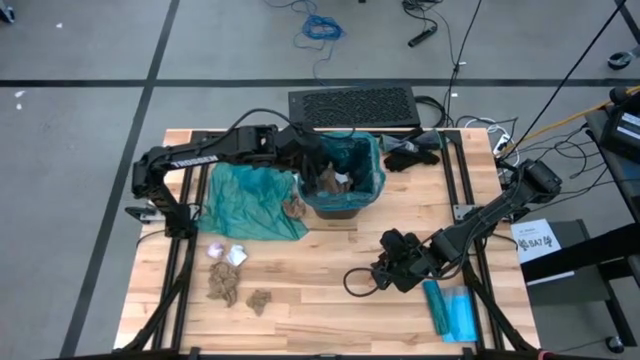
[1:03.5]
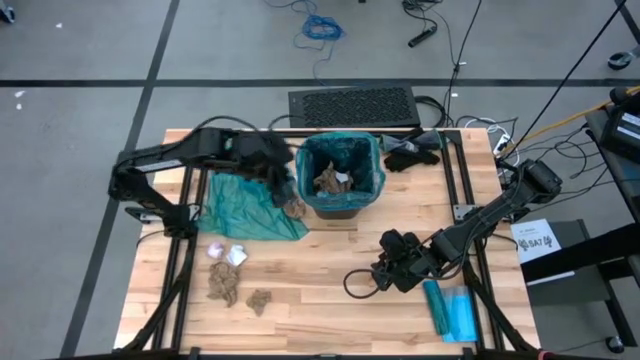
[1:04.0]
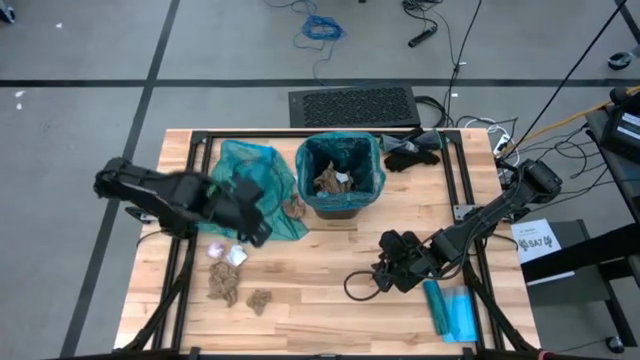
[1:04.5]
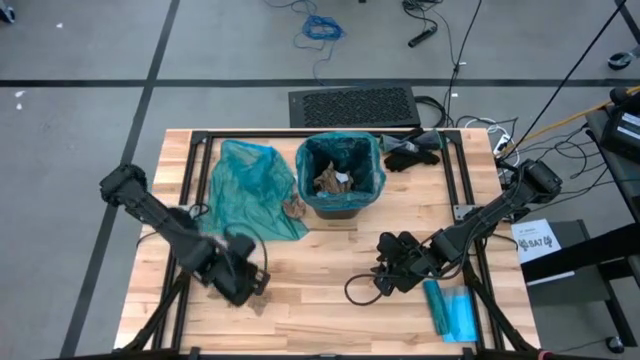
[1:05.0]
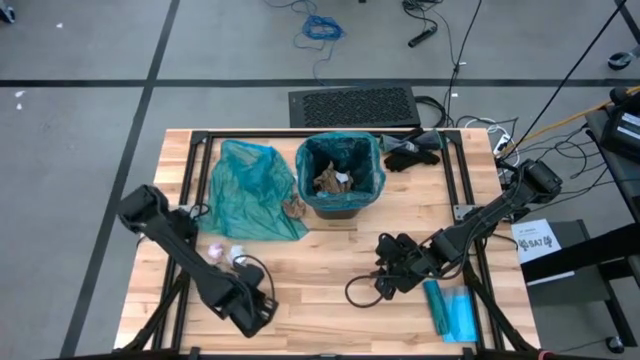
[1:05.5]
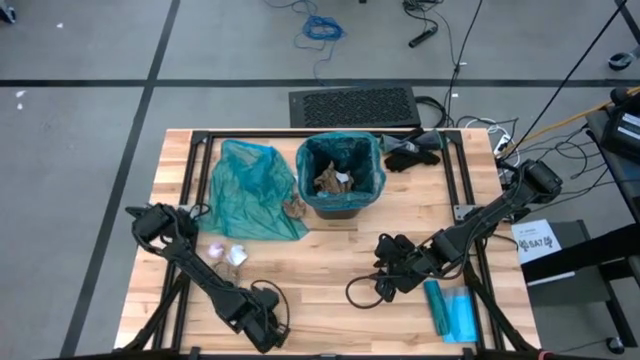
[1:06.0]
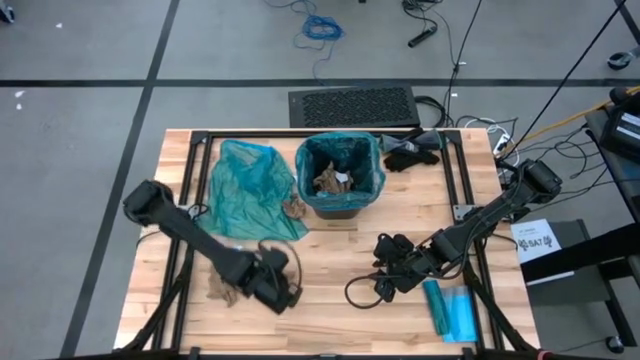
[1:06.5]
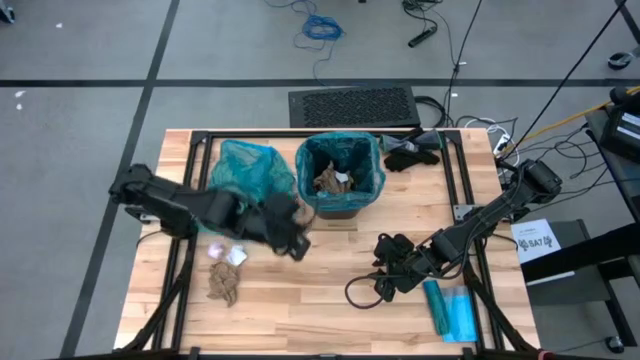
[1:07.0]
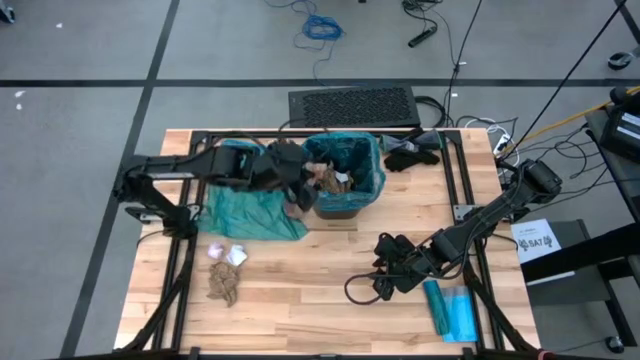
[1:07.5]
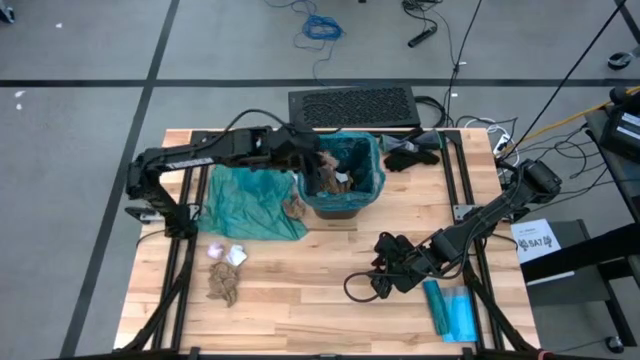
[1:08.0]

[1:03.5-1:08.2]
Task: place trash/remove bag and relplace
Put the brown napkin into the trash bin

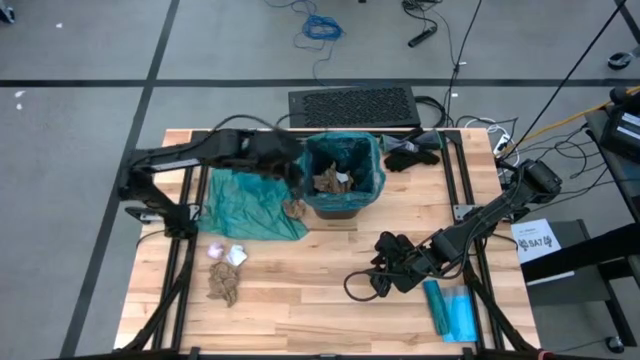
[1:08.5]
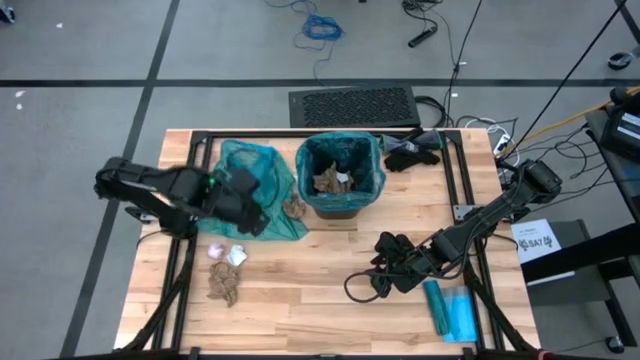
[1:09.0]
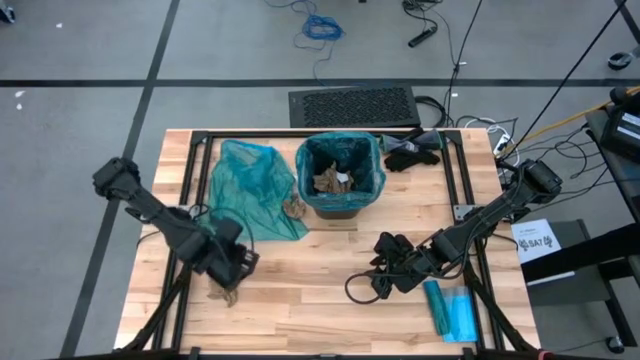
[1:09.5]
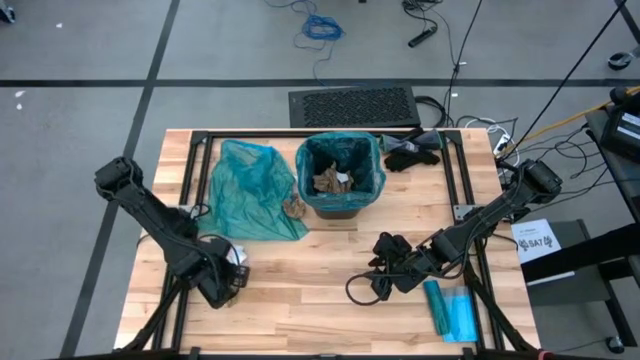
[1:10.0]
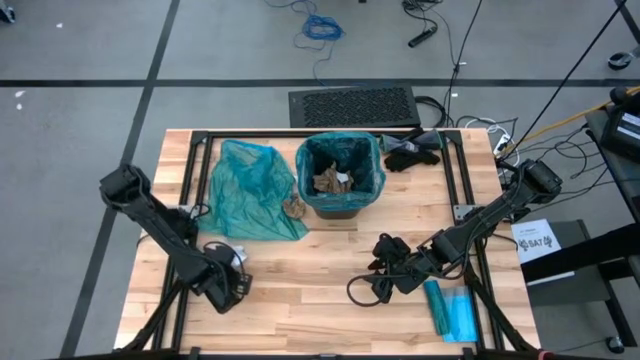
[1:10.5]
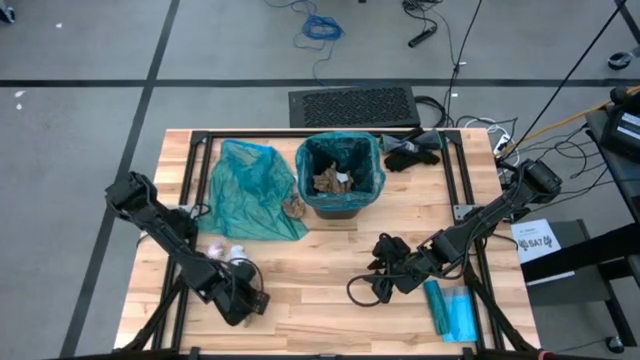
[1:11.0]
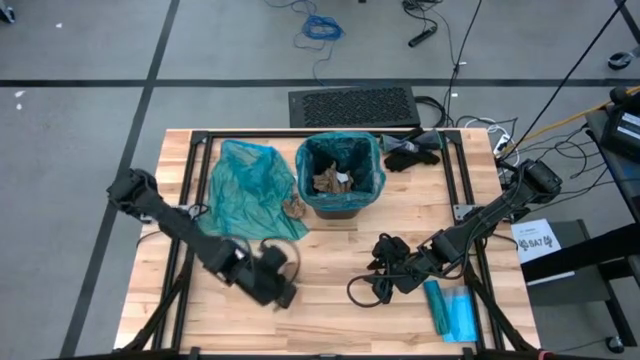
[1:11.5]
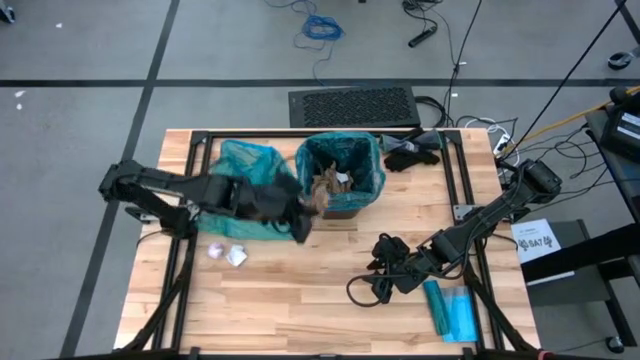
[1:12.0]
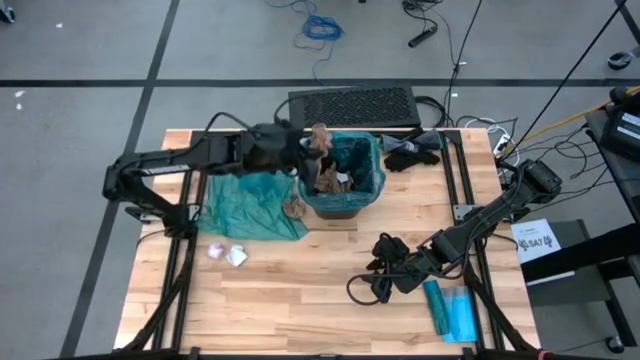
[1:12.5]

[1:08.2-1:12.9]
Put the brown napkin into the trash bin

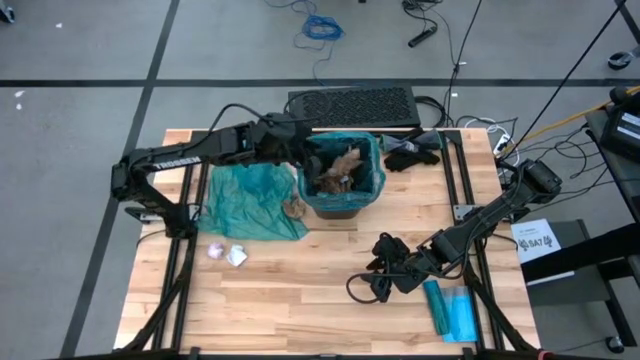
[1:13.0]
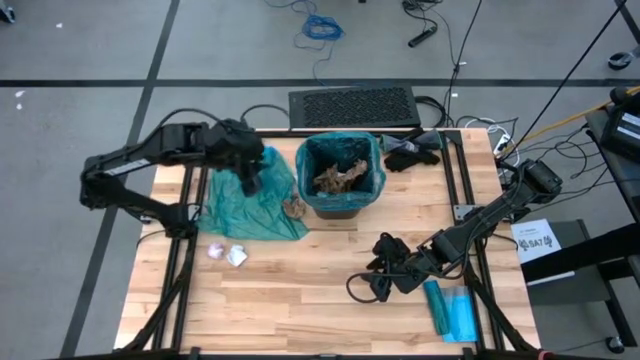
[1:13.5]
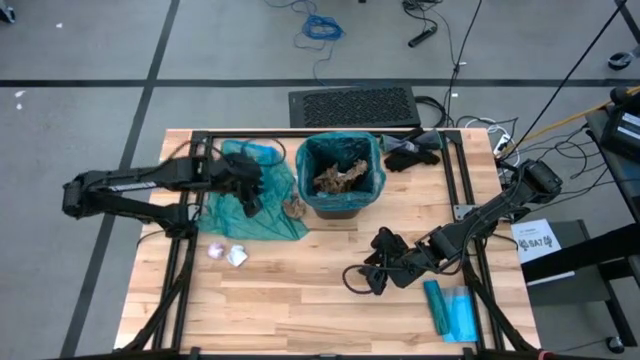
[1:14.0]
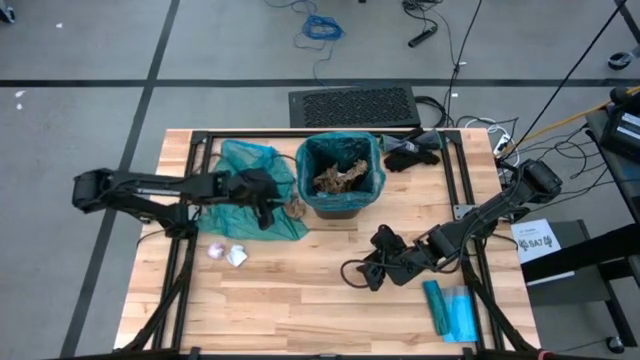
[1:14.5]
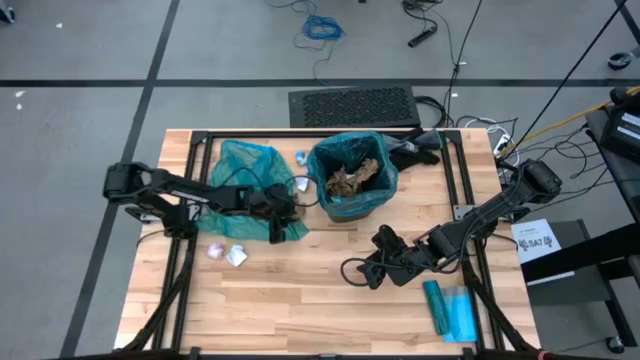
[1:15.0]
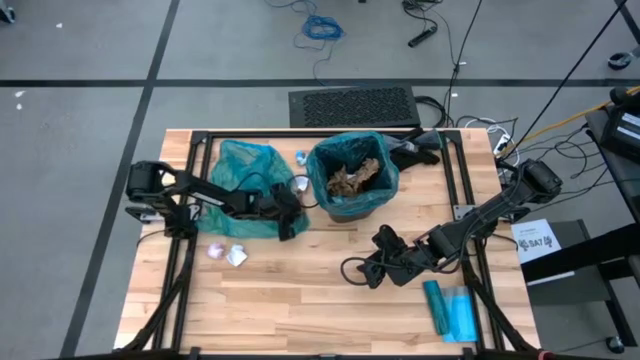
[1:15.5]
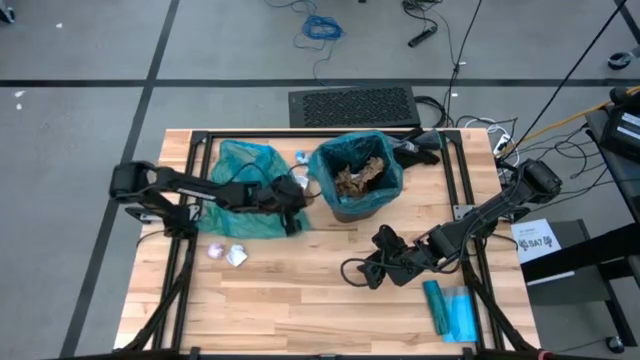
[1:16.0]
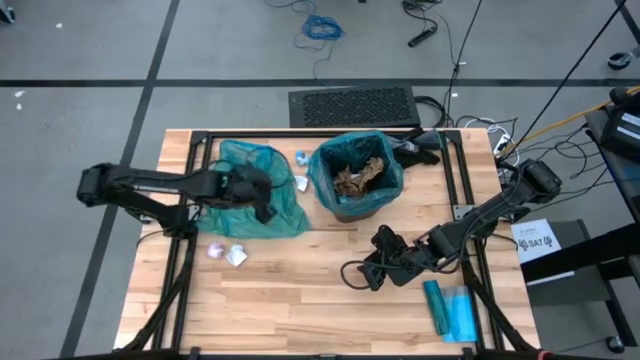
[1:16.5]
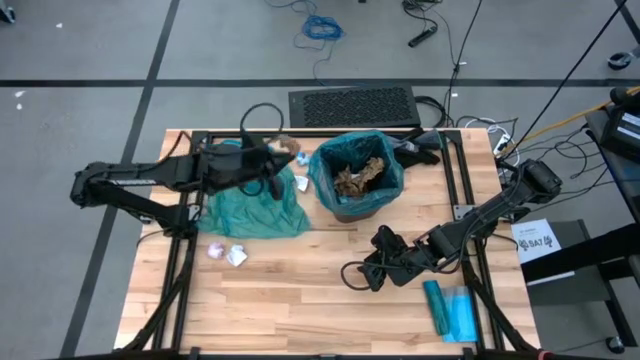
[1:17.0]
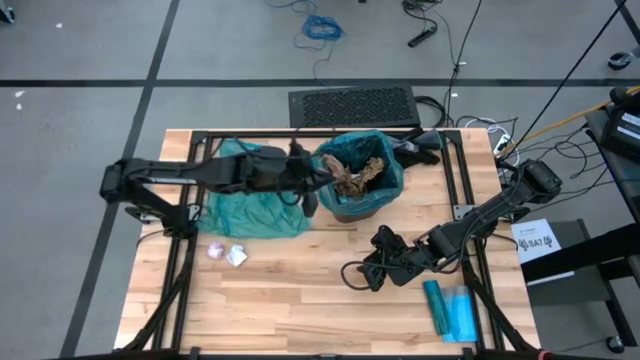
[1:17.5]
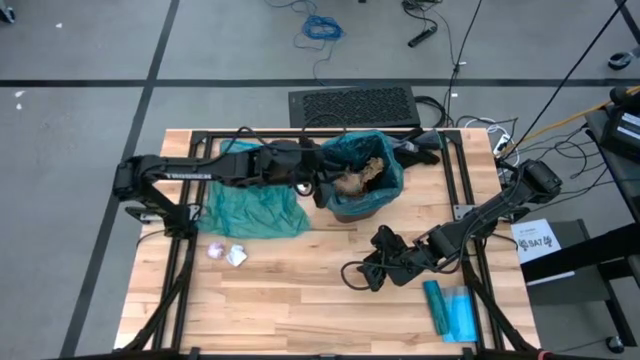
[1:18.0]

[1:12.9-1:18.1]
Put the brown napkin into the trash bin

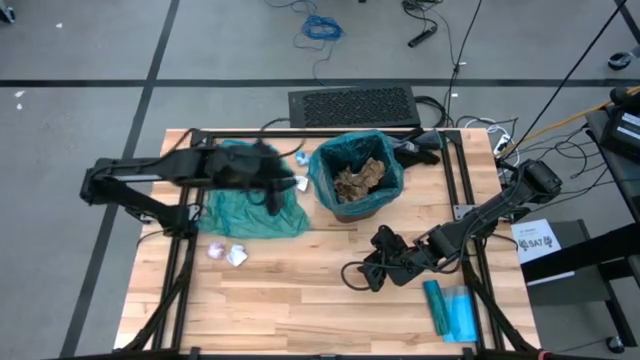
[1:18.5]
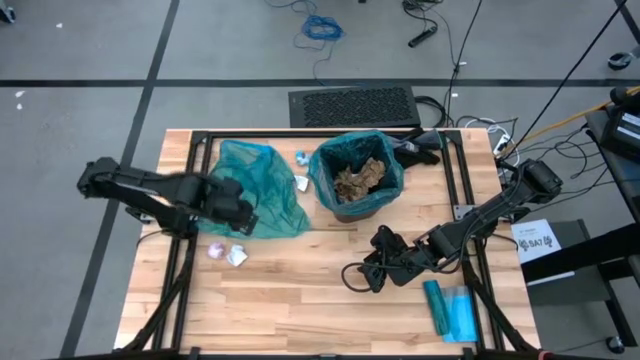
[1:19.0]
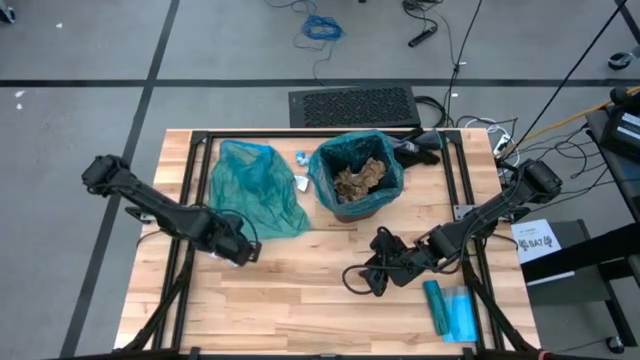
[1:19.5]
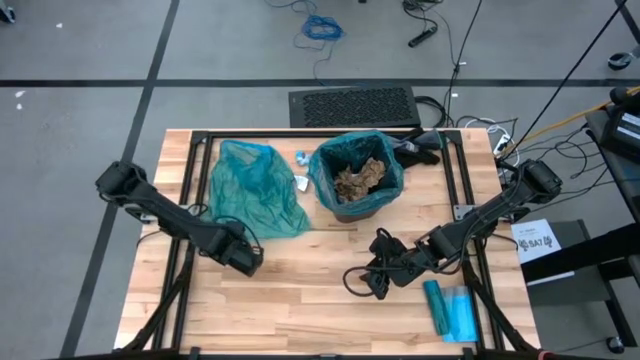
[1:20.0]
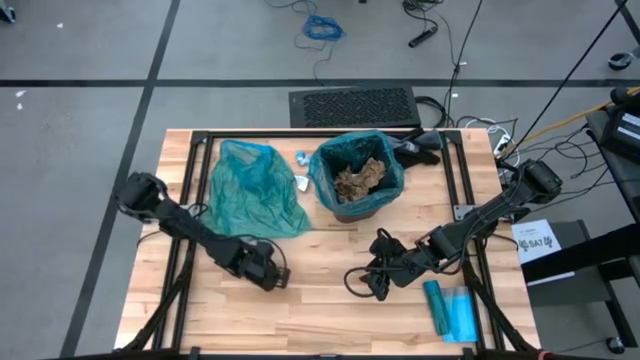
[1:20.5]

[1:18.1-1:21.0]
Put the white paper into the trash bin

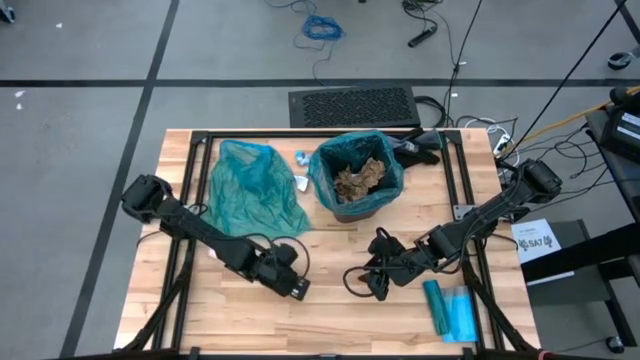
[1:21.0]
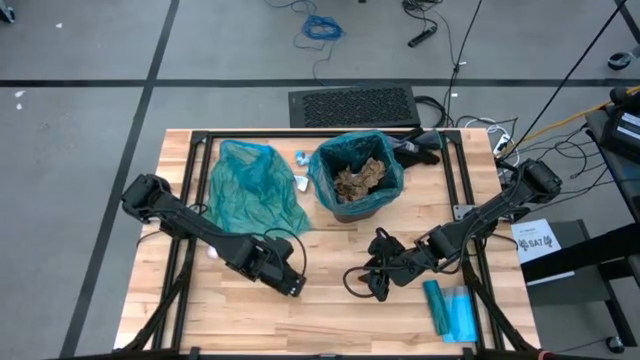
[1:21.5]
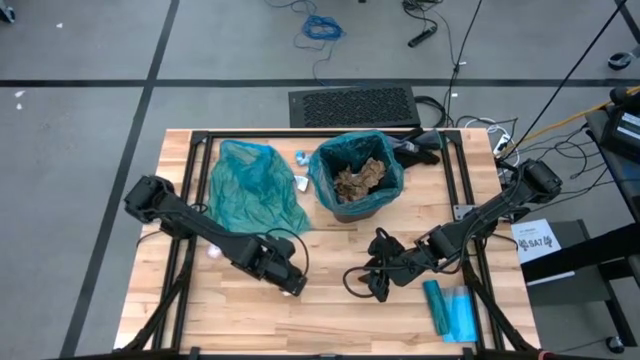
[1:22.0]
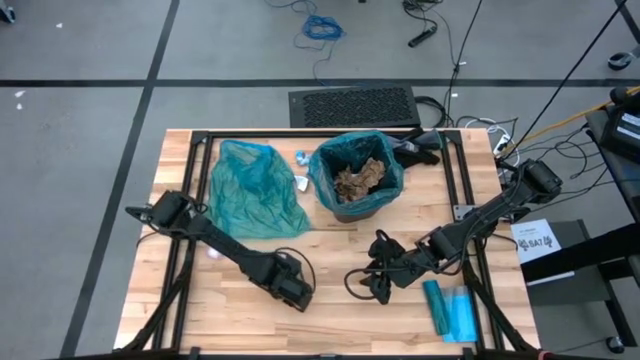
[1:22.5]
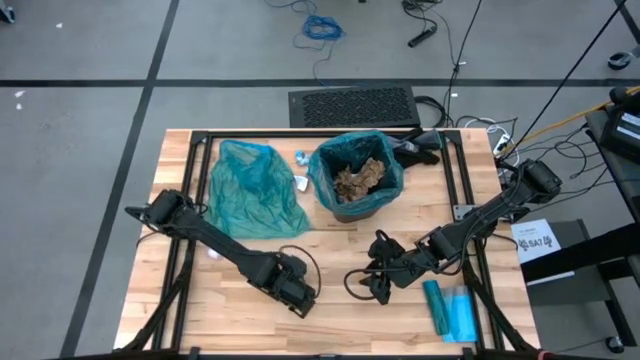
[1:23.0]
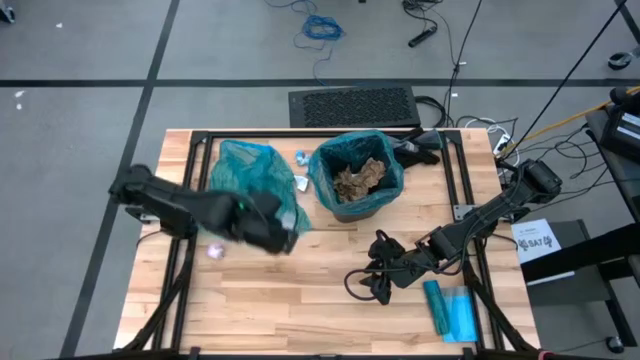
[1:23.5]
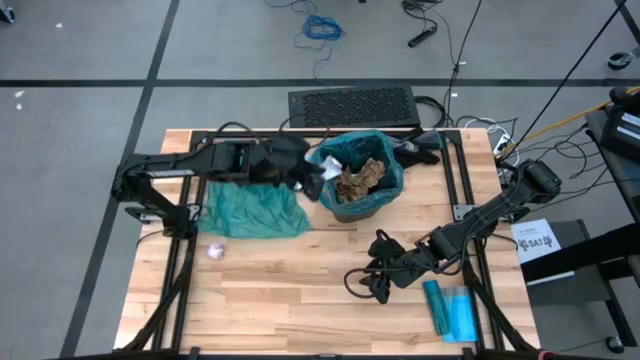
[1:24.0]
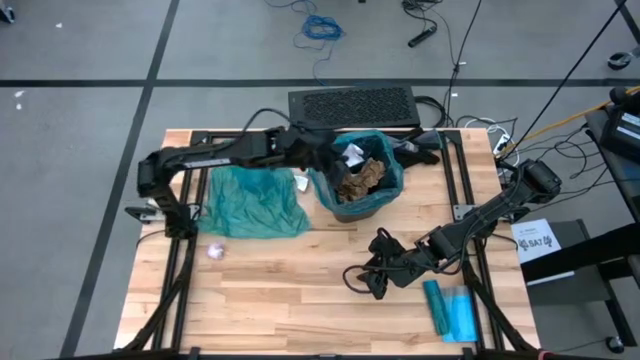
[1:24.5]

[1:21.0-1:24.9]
Put the white paper into the trash bin
